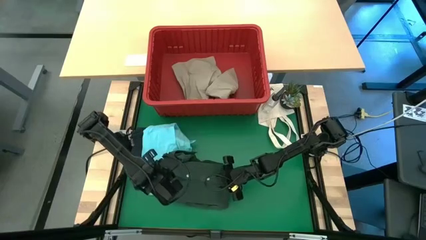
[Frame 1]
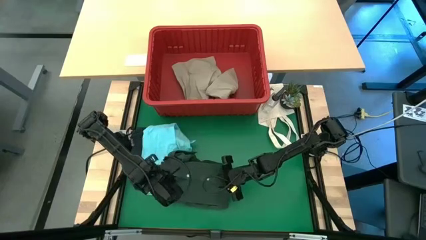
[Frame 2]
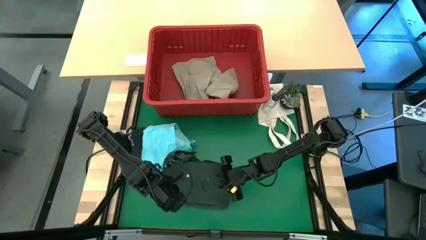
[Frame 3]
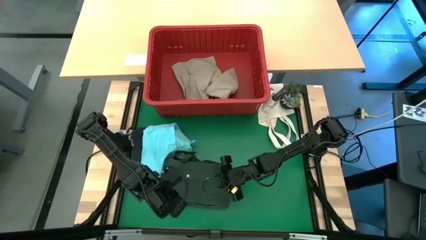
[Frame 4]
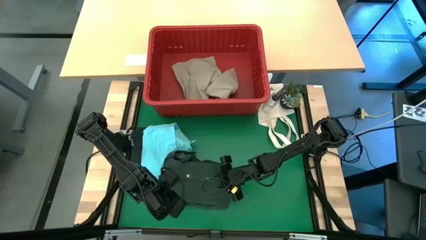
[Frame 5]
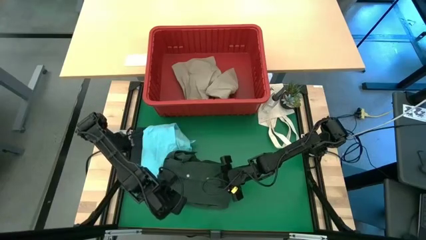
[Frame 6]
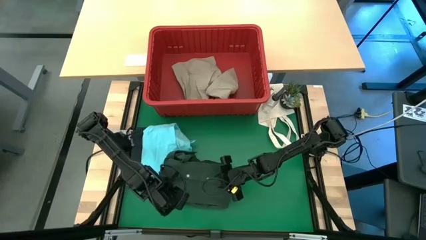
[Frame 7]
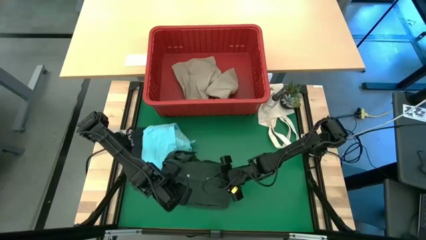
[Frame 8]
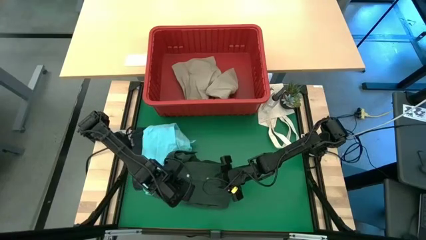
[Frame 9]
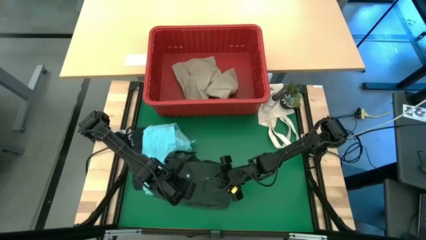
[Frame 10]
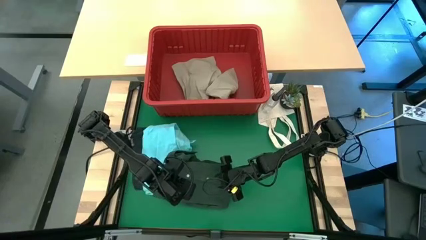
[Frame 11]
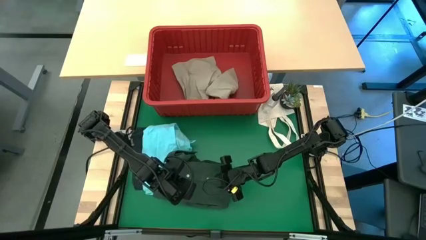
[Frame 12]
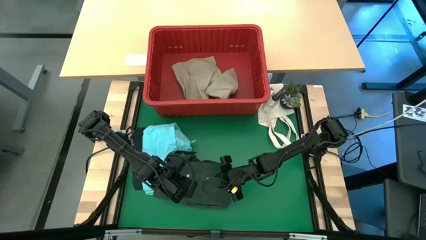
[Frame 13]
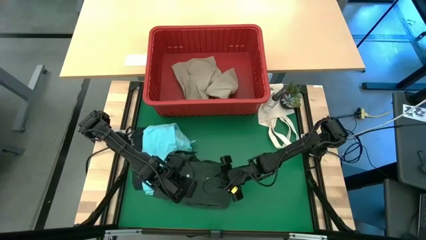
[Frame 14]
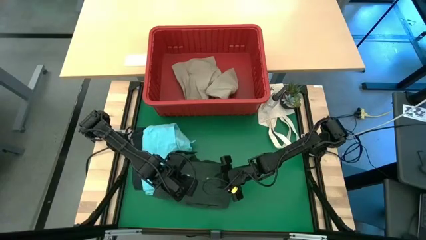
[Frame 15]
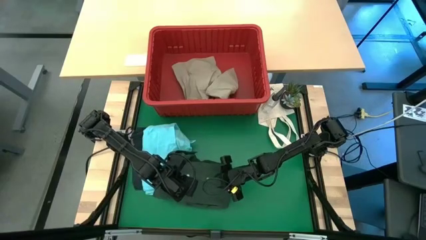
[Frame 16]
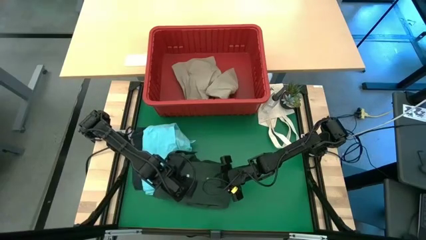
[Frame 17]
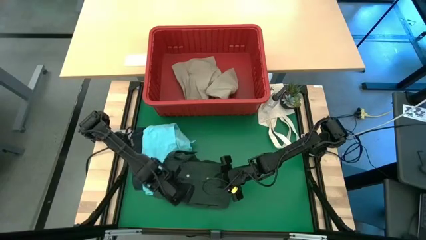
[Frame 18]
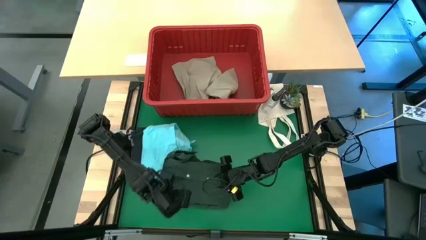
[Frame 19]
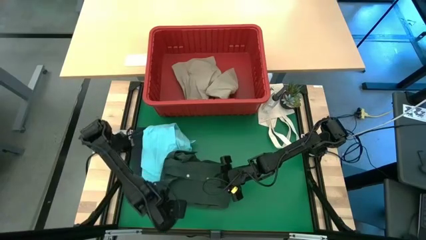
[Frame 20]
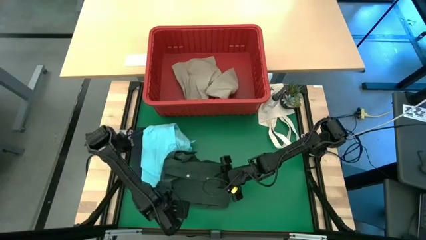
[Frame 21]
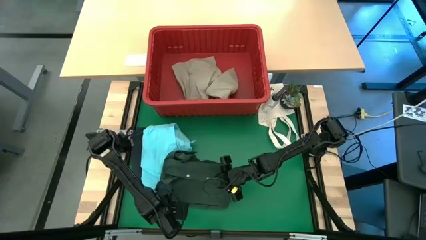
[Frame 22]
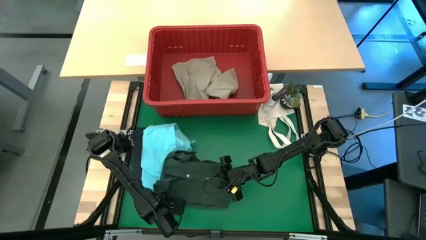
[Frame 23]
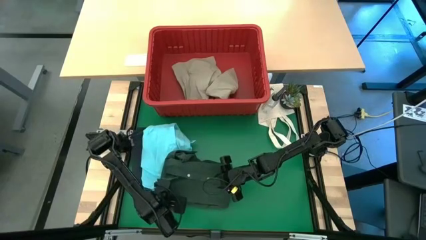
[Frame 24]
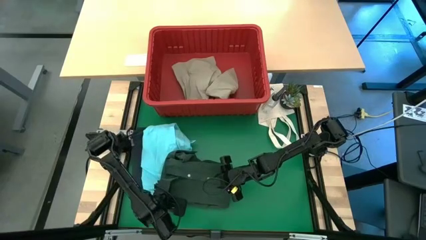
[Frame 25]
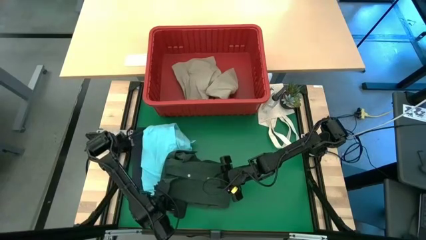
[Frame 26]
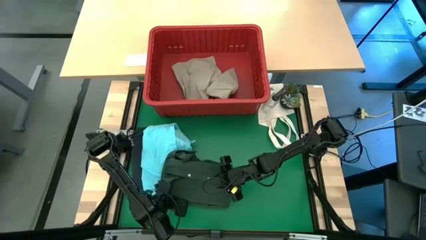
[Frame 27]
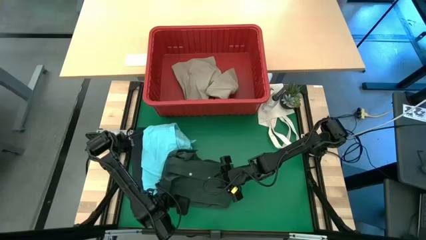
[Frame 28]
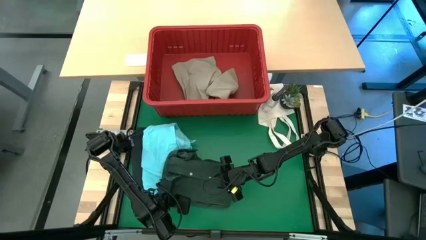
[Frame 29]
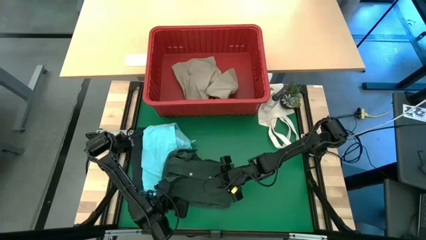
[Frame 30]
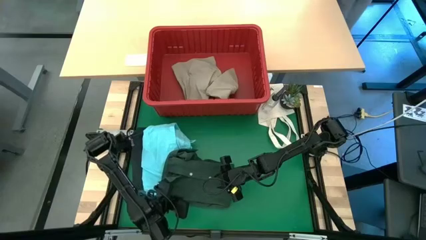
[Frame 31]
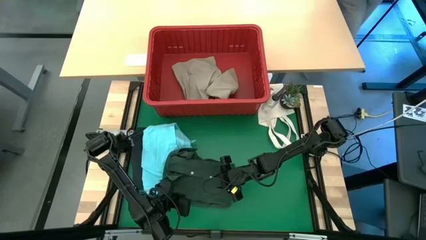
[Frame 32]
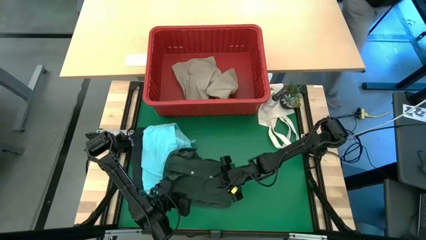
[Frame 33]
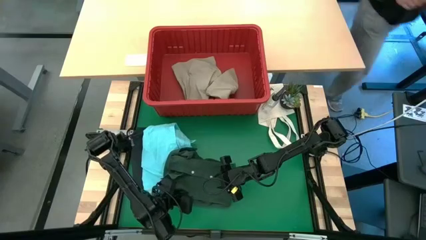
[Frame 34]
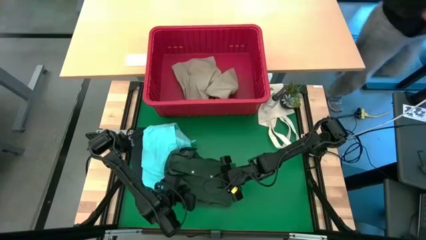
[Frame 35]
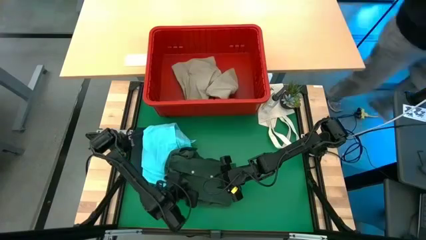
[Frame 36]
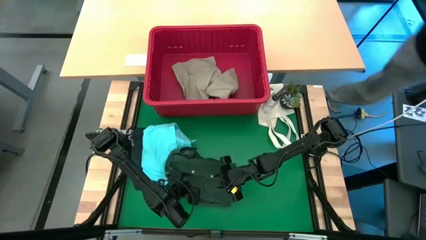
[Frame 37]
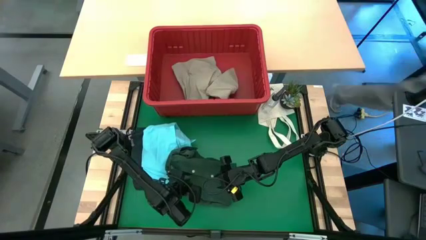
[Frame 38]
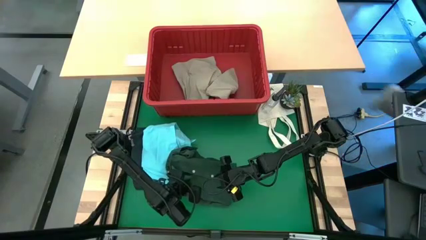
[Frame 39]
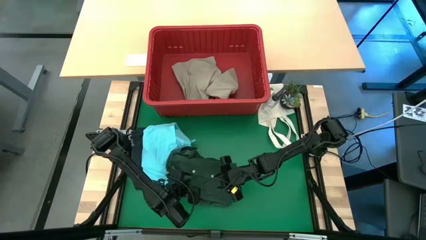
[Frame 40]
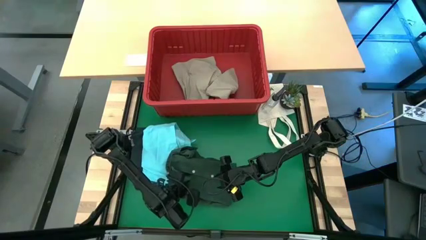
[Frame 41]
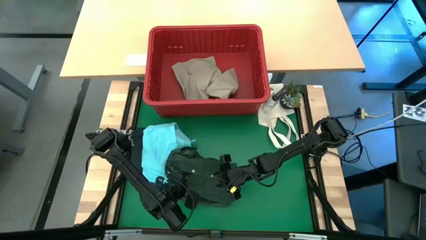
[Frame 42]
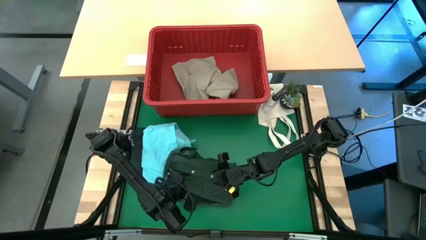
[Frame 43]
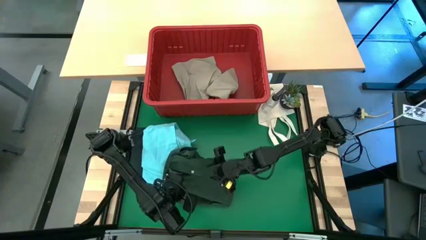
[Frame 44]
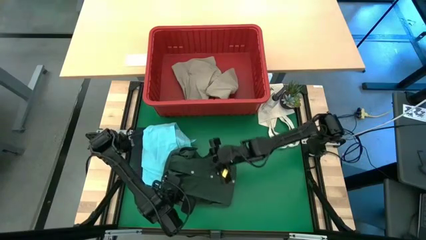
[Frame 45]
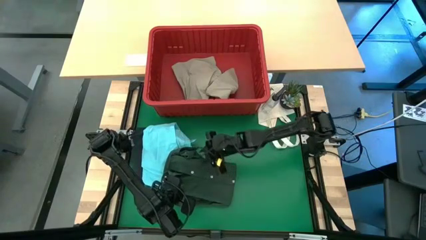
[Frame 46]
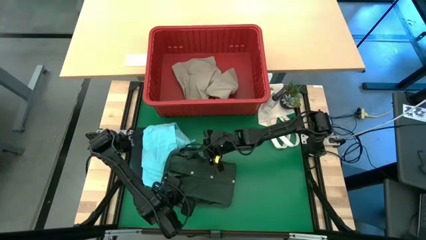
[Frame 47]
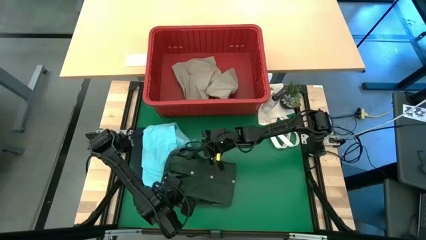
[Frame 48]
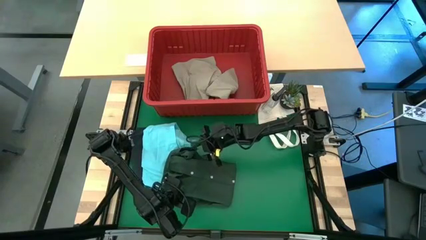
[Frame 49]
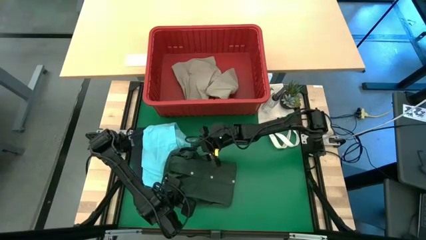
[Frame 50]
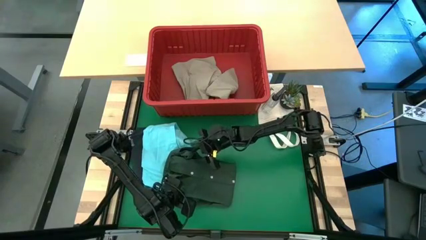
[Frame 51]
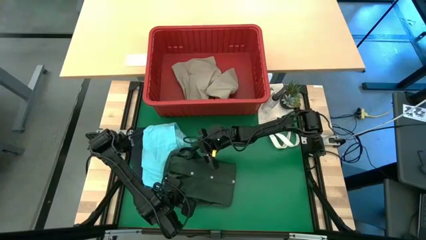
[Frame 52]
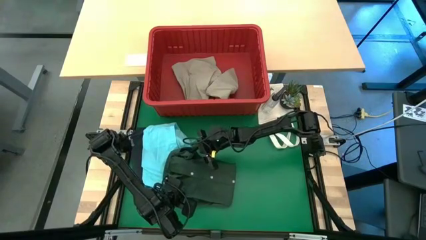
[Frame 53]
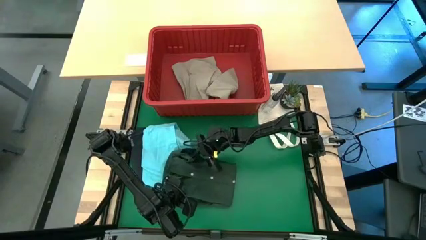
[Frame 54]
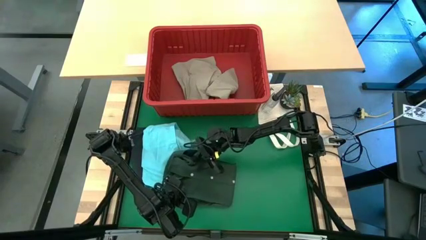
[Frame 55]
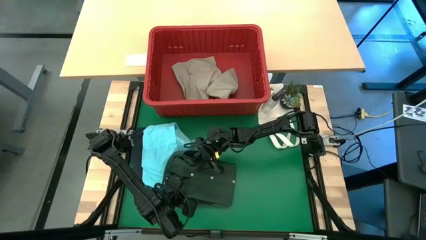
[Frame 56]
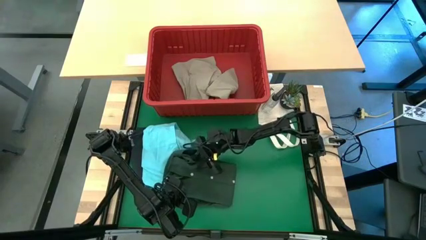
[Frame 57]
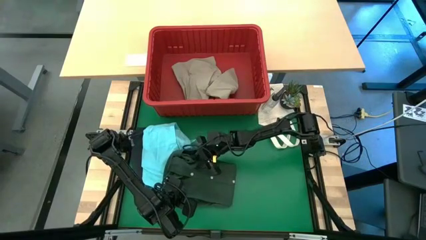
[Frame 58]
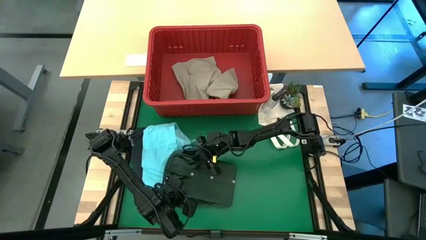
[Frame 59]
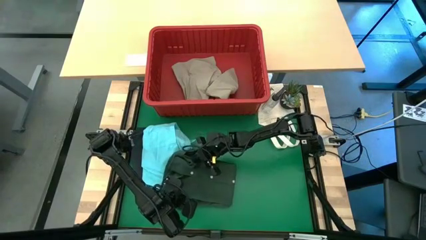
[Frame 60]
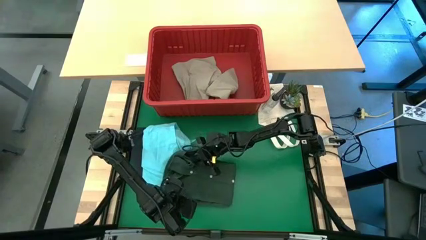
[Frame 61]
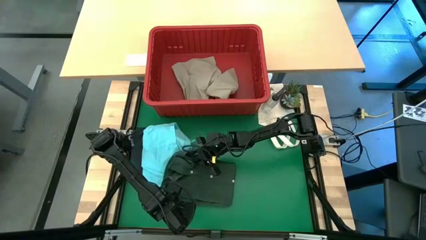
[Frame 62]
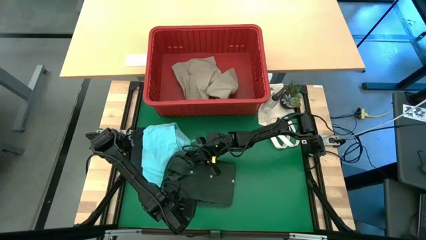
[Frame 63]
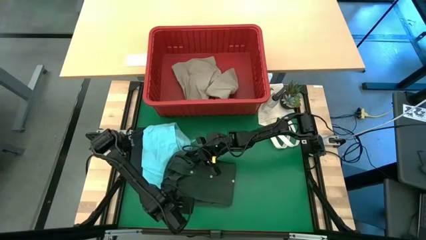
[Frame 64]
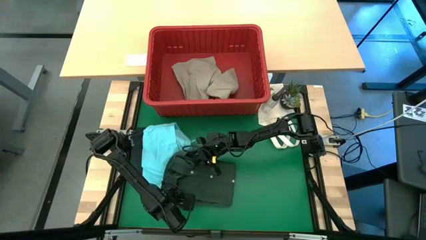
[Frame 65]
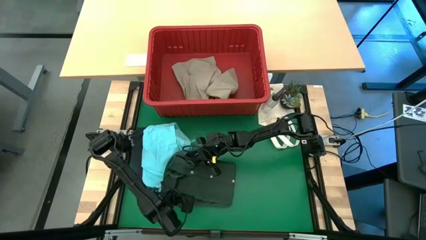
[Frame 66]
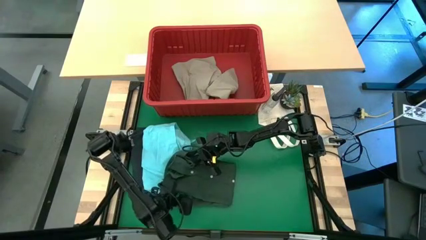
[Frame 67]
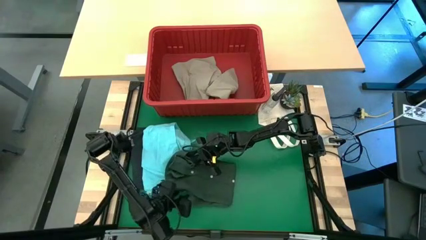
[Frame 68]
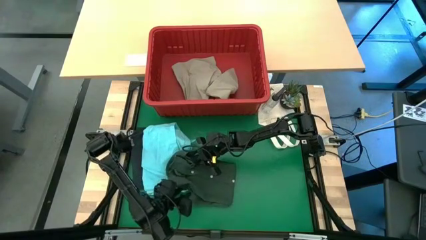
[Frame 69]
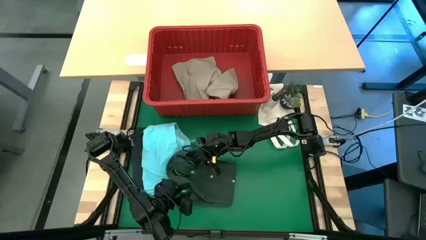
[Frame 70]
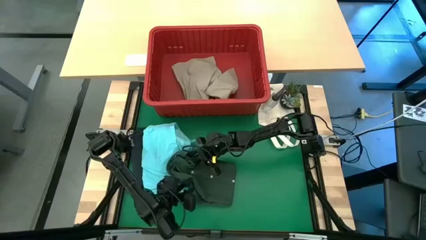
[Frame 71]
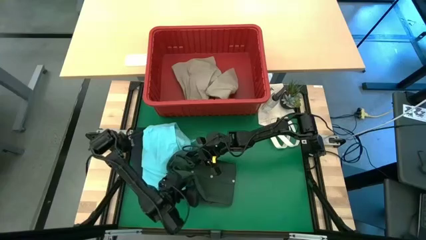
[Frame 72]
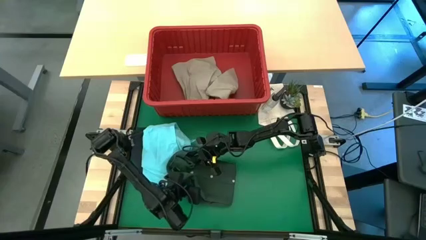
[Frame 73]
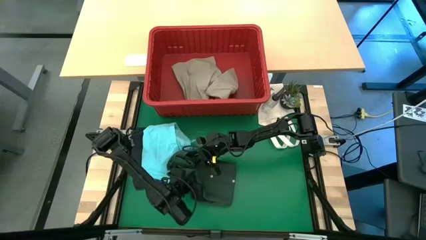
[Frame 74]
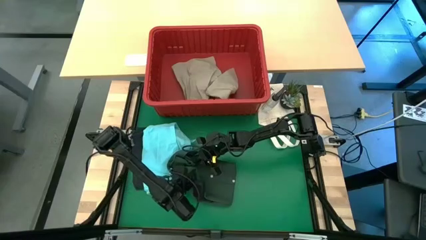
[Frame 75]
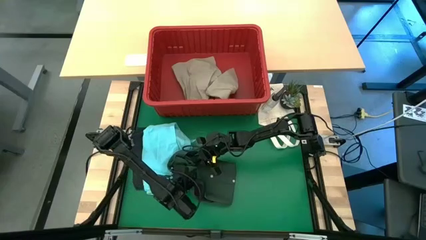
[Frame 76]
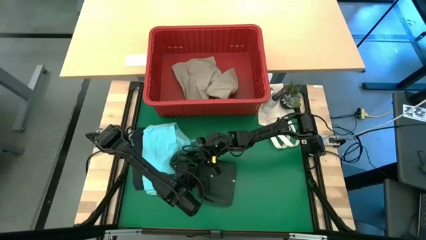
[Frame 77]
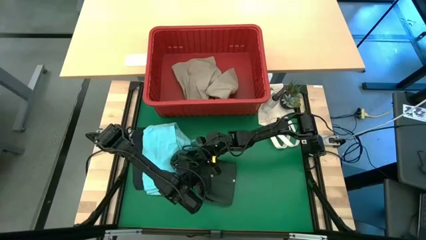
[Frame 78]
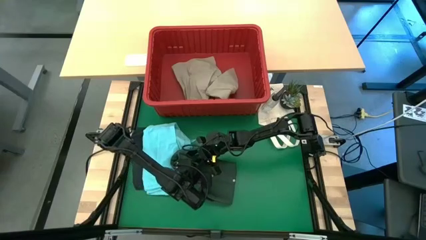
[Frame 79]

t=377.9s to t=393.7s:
Task: Fold Laundry from Bin
Stack the folded green polo shirt on top of the folded blue shorts
